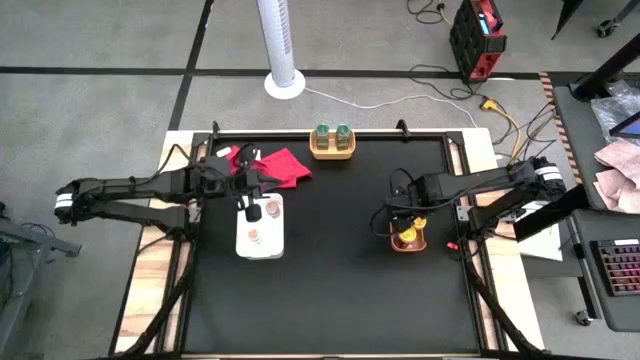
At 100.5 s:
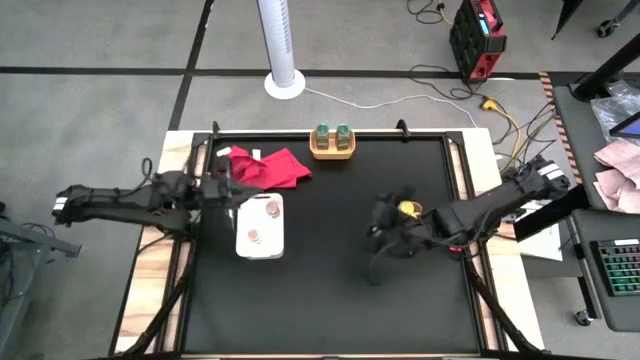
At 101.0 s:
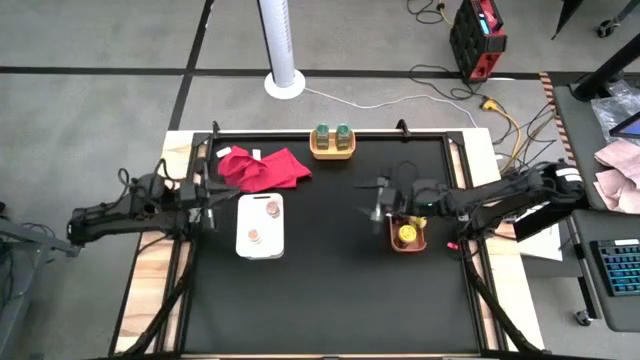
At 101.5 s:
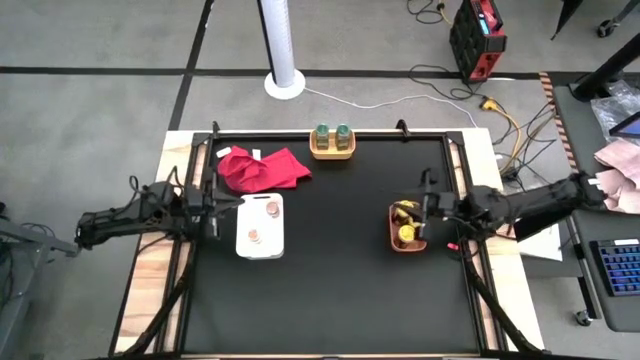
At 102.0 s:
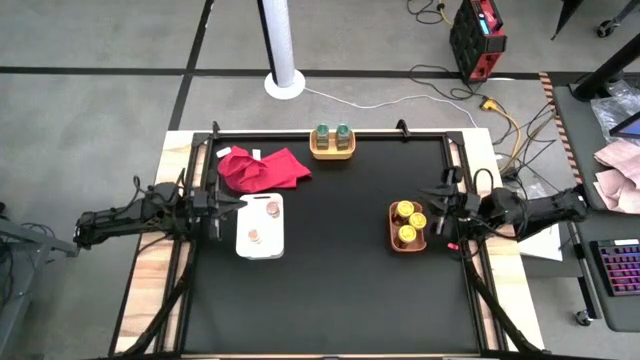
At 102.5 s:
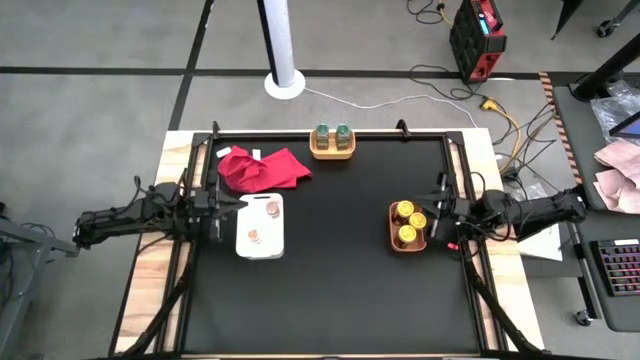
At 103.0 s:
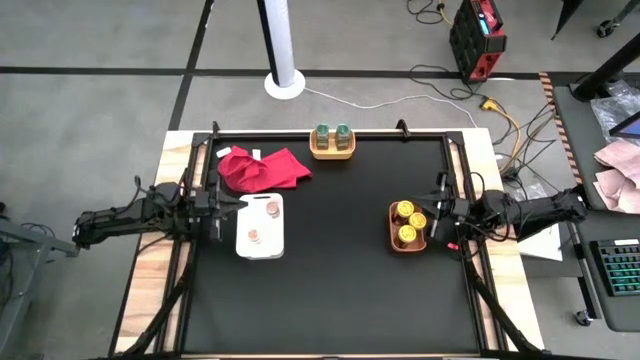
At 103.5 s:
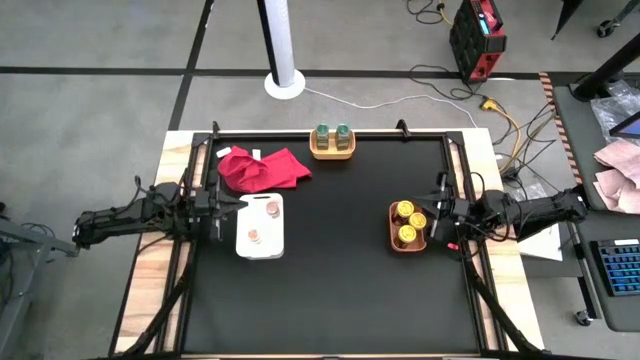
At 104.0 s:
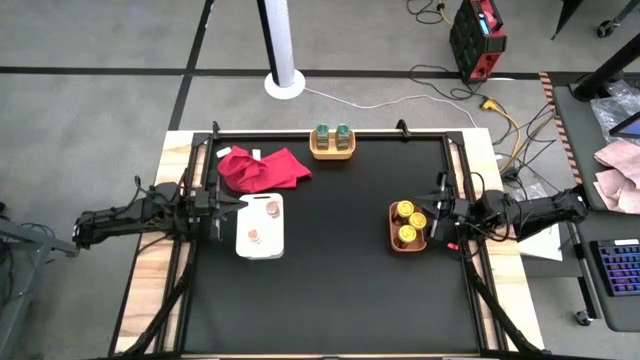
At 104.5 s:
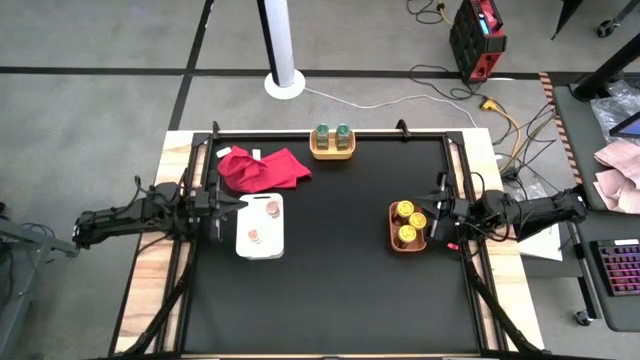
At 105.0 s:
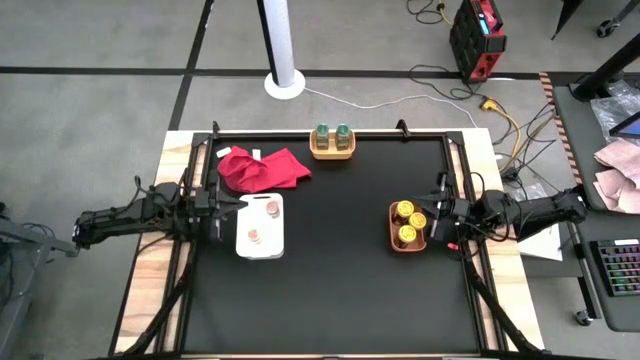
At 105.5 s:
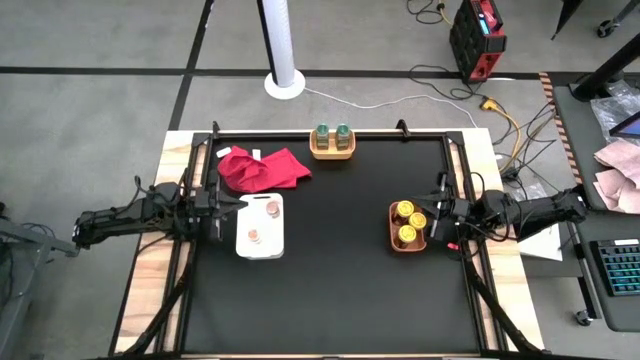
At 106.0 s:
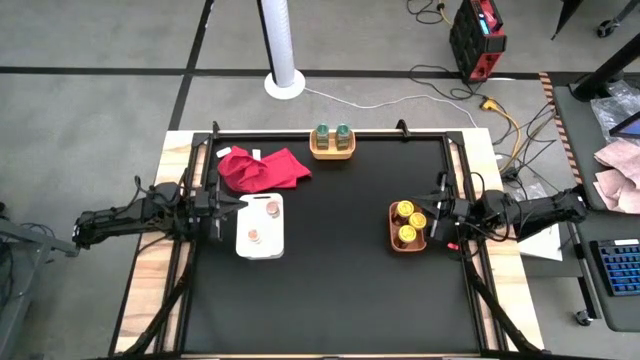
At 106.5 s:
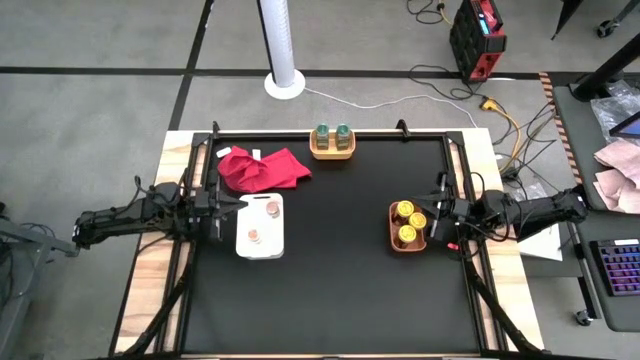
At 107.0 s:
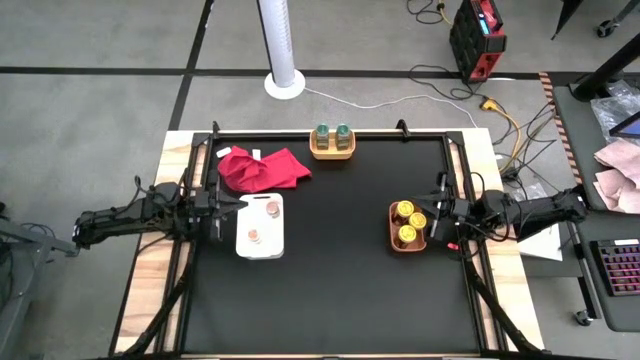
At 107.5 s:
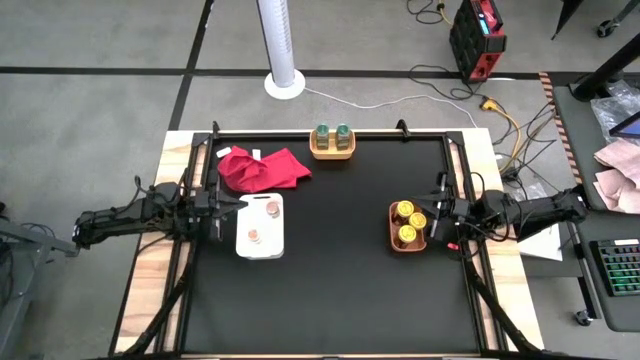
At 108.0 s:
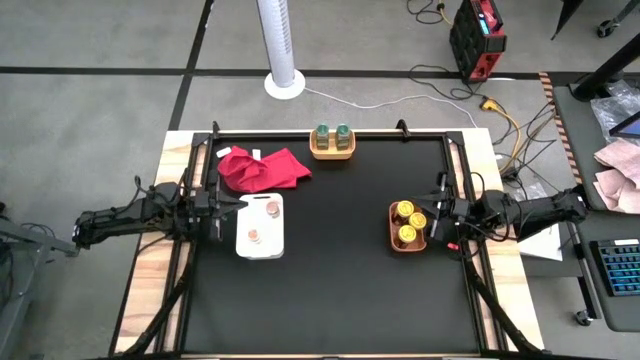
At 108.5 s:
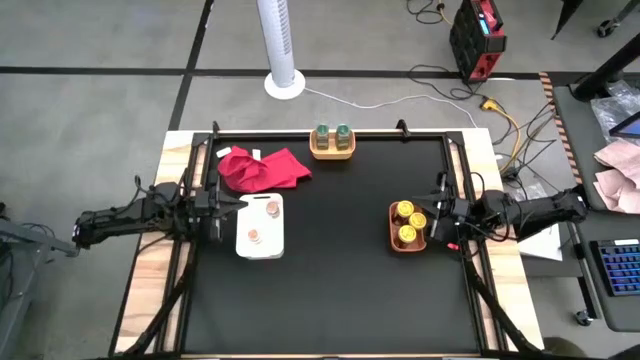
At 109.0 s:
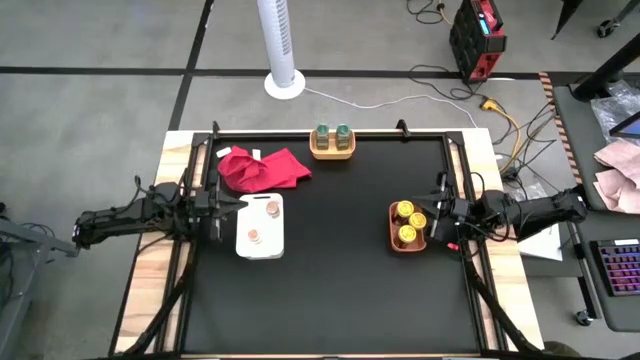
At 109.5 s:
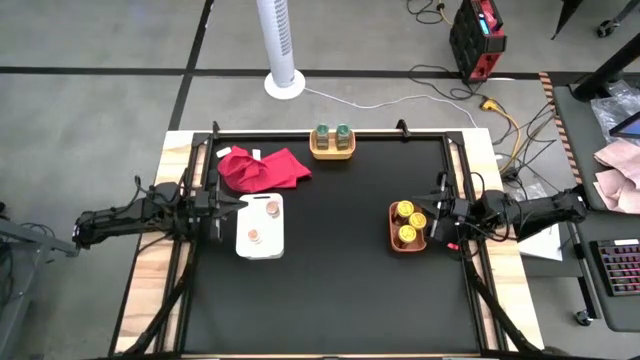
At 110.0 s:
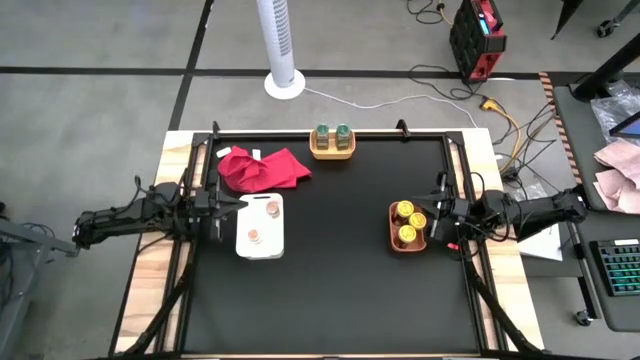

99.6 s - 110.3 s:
Task: Sort spices by type
Return to Home Position

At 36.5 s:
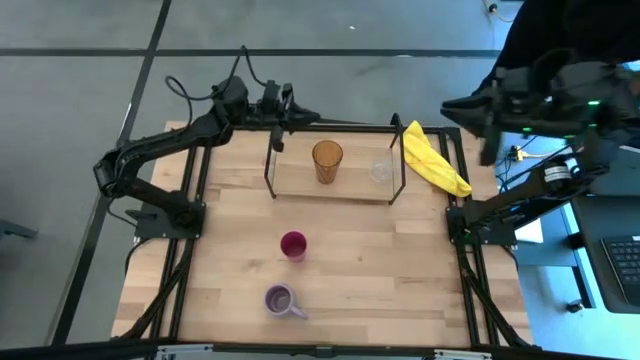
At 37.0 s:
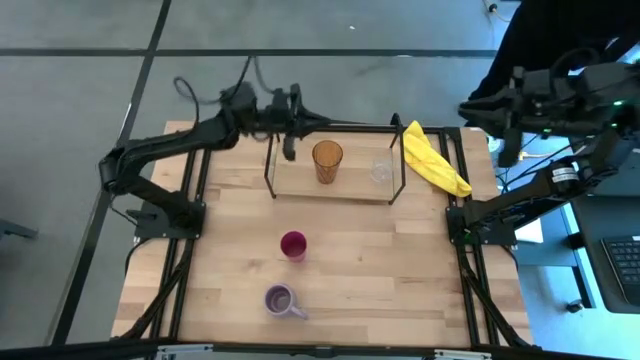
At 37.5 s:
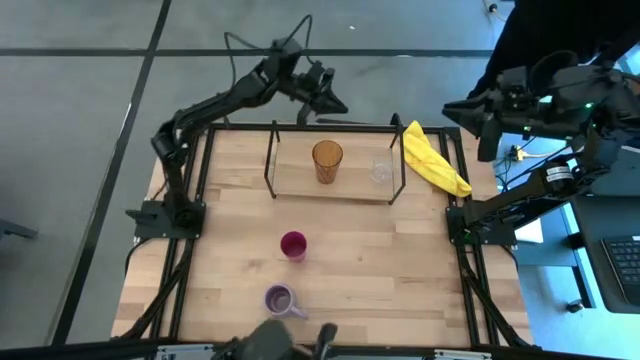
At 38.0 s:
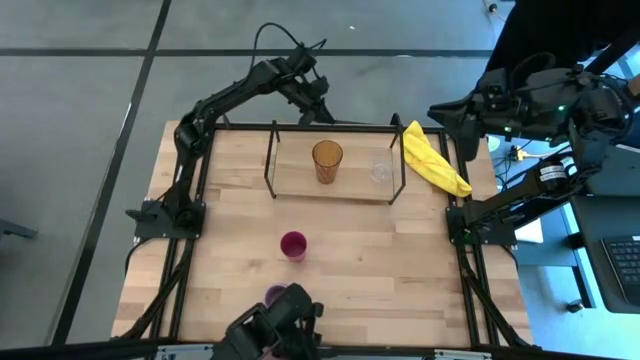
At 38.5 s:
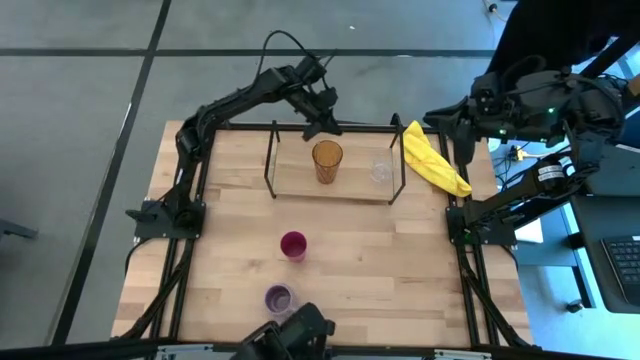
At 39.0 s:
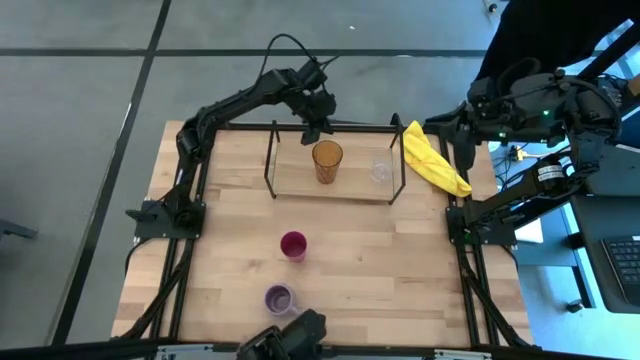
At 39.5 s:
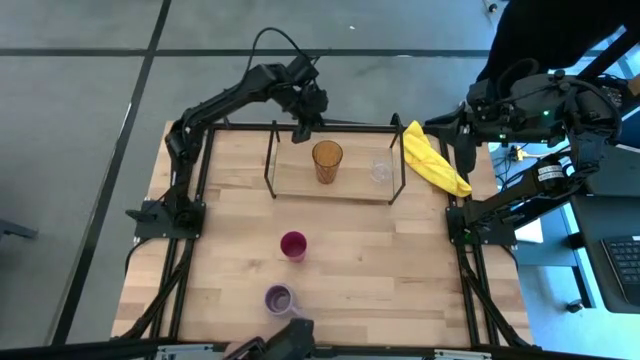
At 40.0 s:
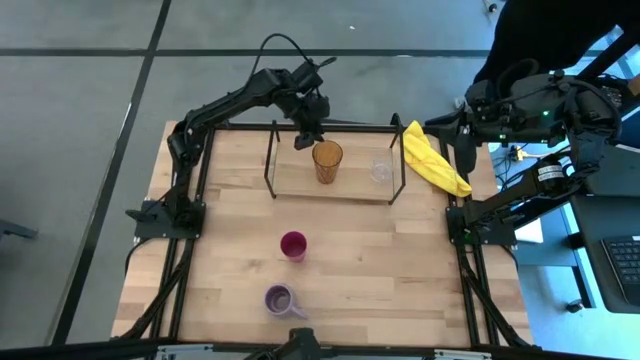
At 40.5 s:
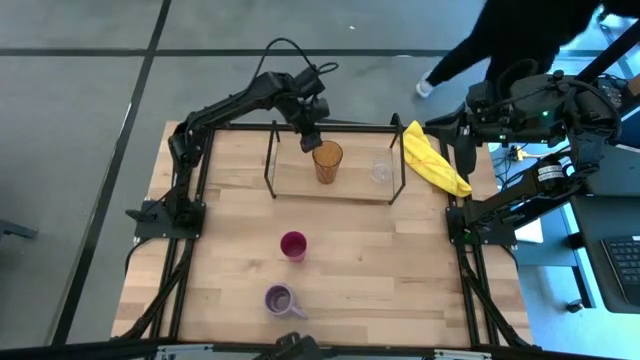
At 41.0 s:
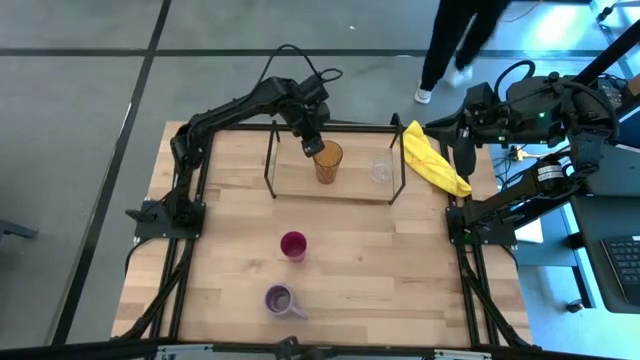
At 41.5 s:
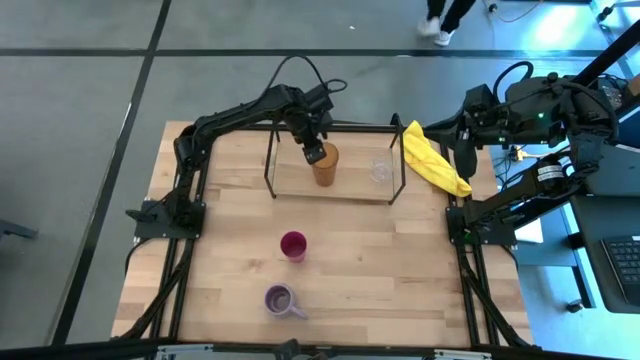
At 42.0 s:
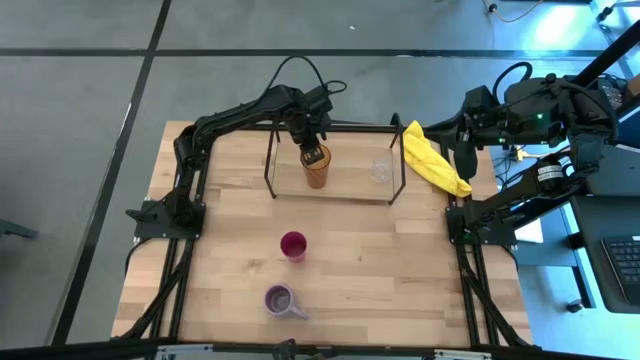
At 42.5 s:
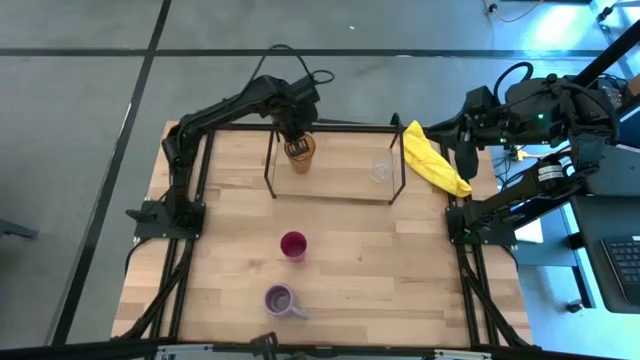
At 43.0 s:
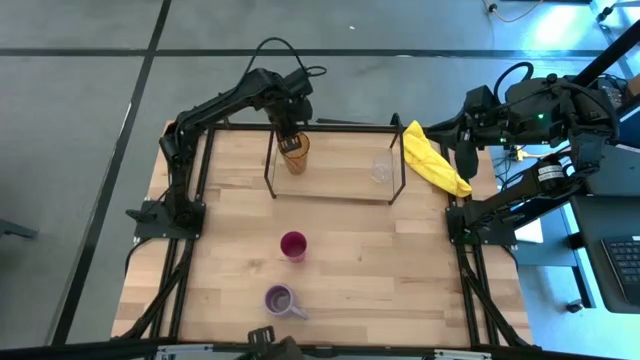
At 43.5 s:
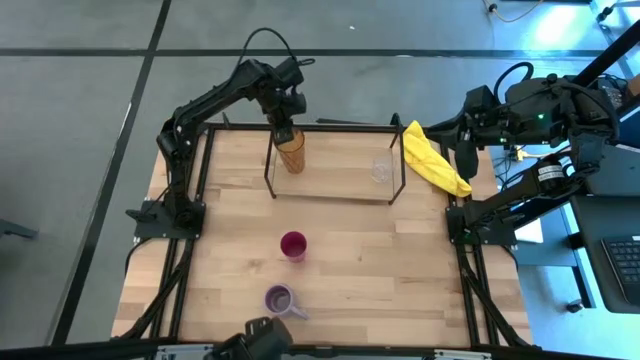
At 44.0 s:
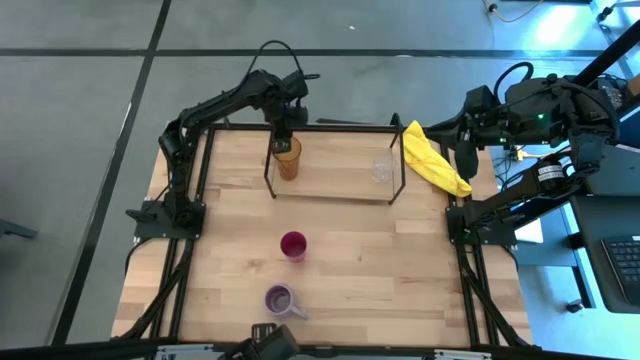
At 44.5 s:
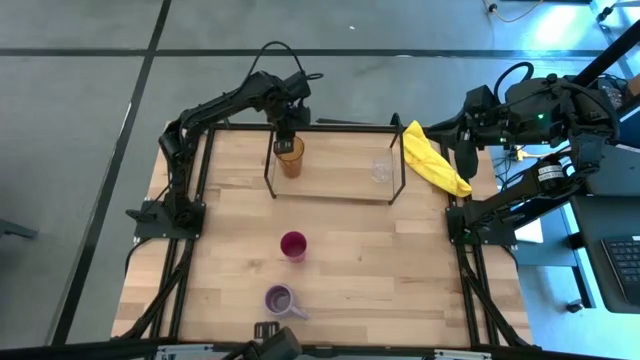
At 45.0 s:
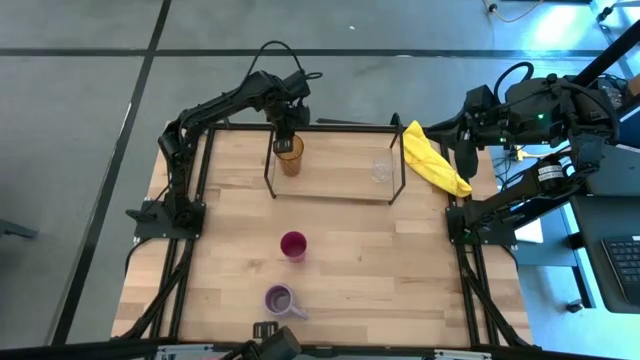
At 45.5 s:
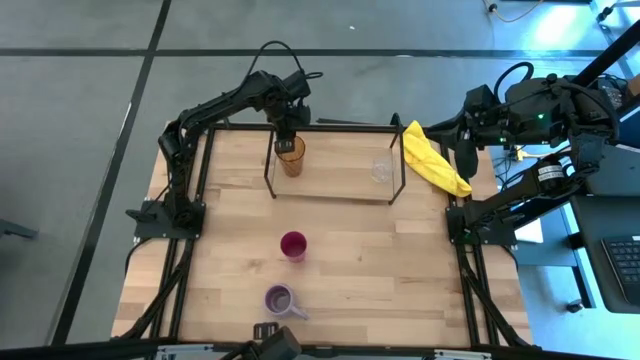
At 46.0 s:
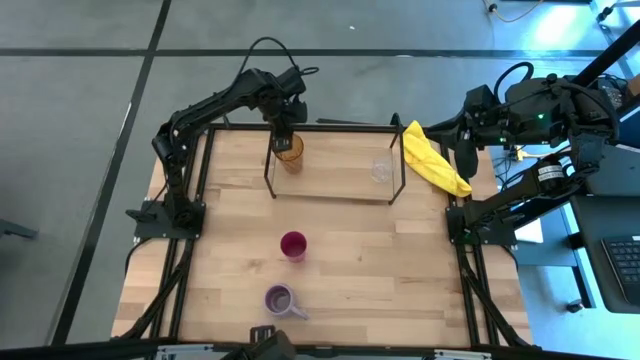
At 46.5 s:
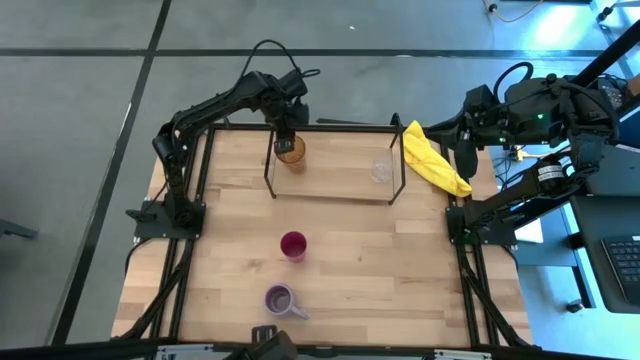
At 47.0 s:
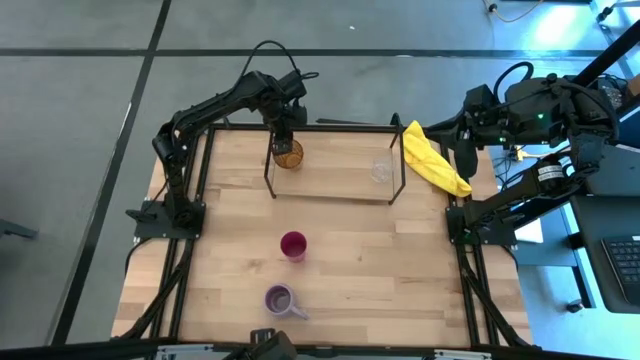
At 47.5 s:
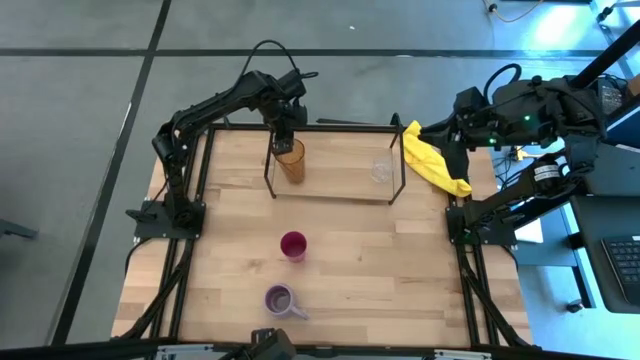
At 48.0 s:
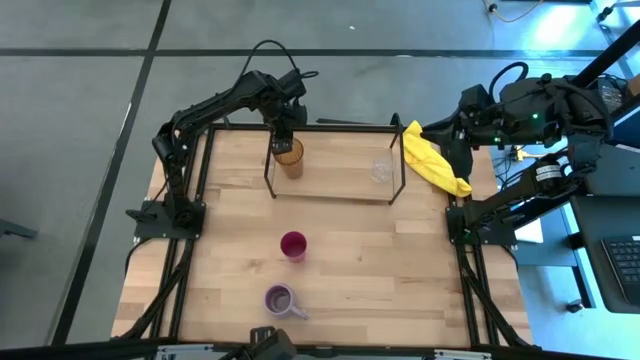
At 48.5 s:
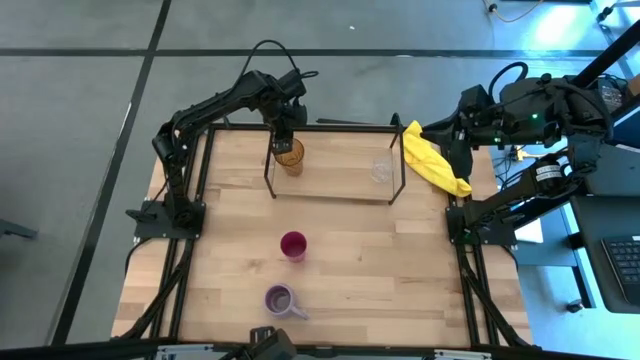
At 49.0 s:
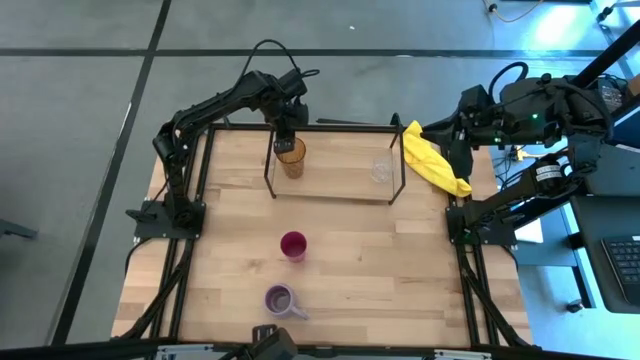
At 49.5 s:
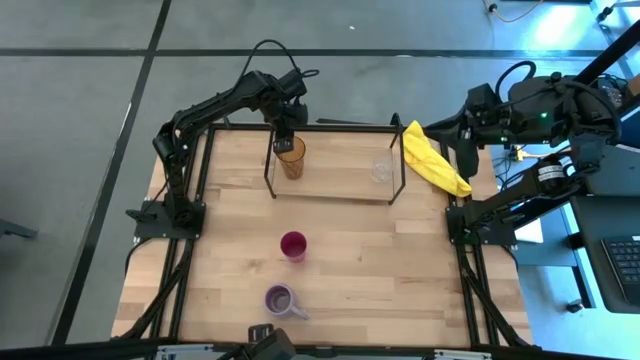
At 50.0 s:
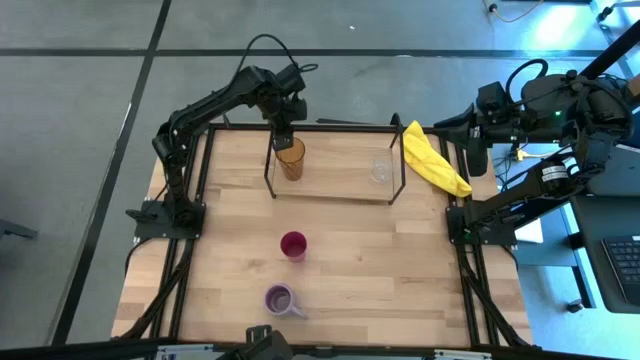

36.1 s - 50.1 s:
Task: Stack small to large cups/mugs on shelf
Put the brown cup on the shelf
